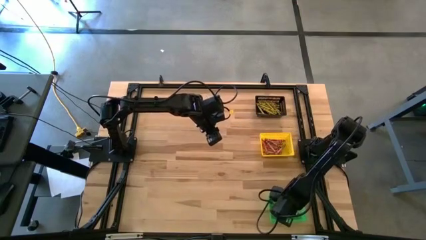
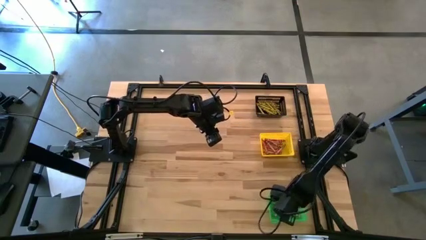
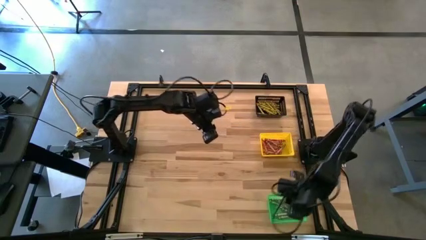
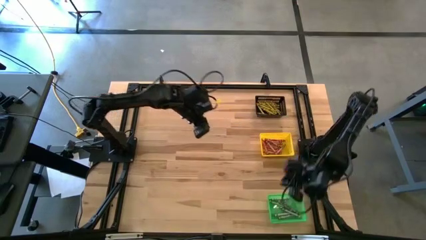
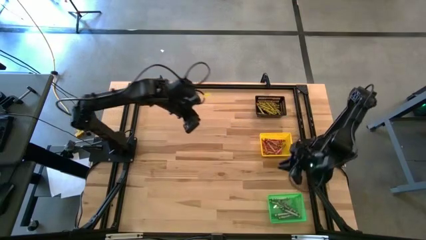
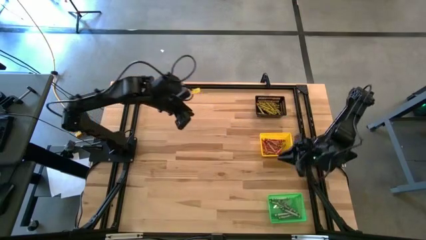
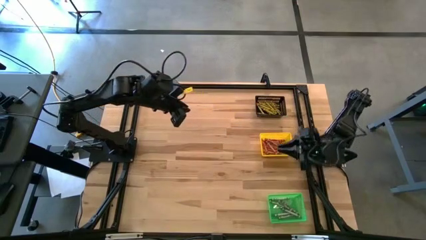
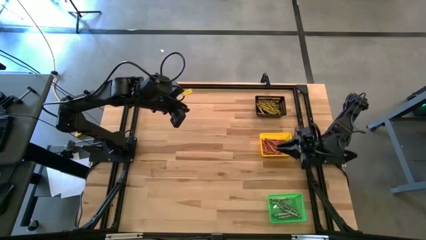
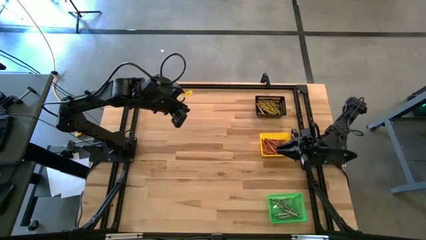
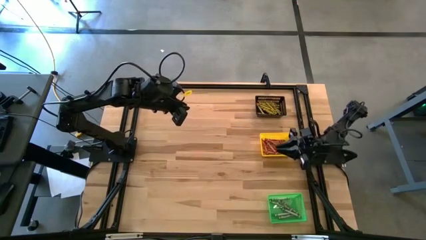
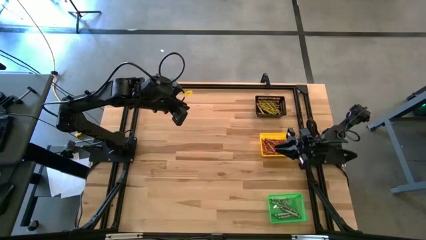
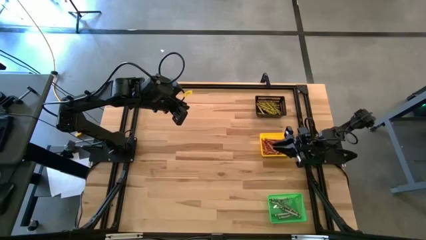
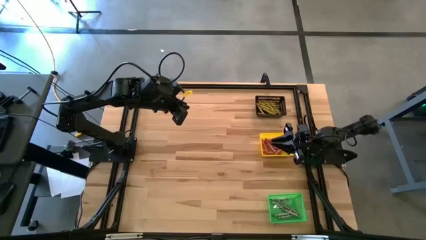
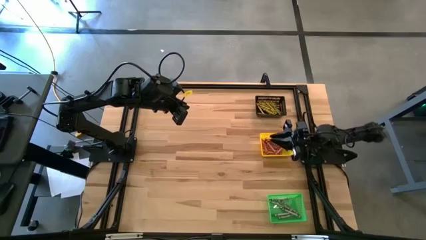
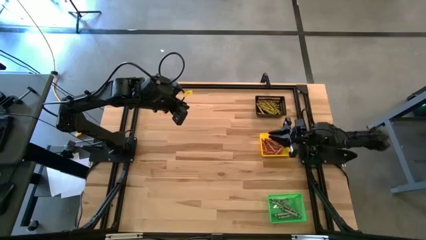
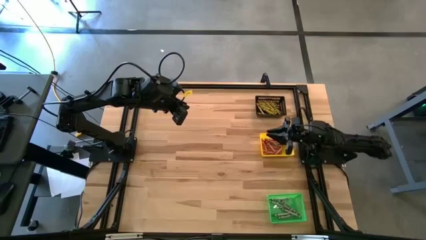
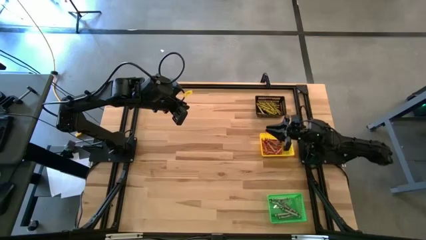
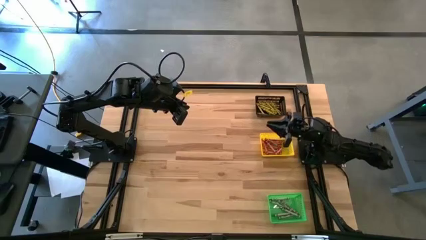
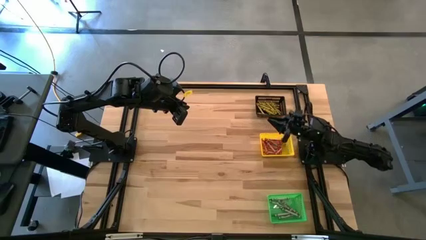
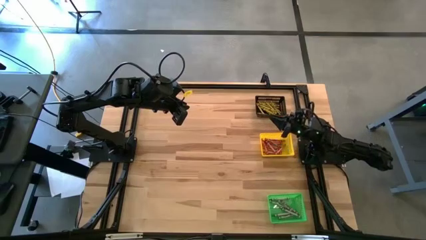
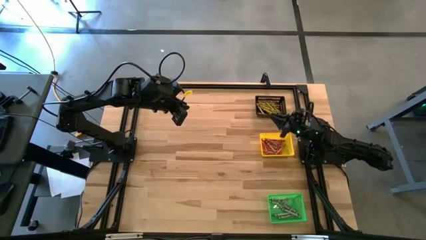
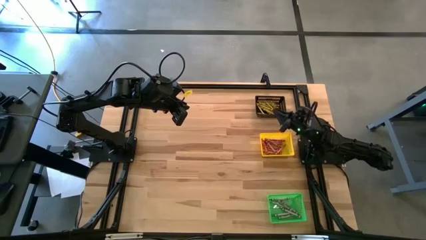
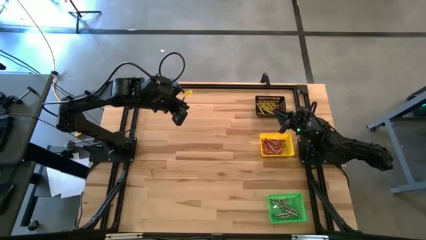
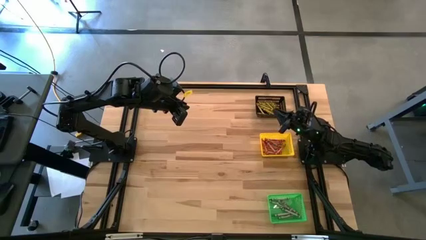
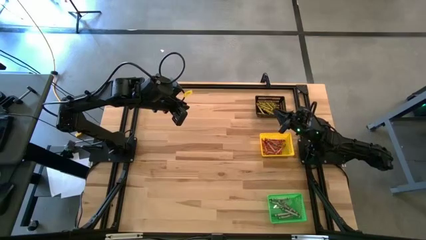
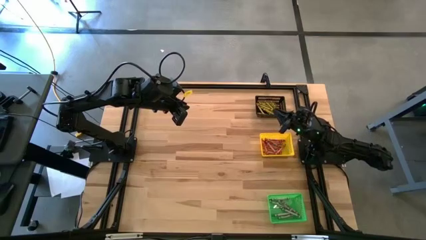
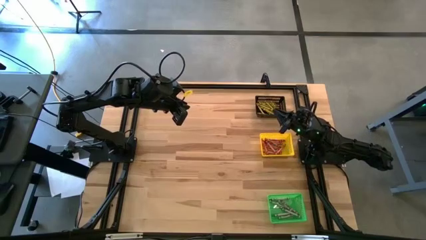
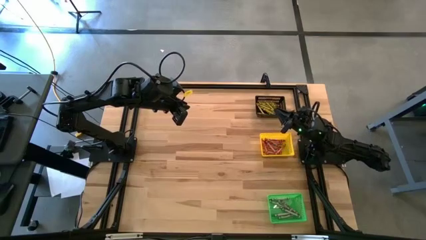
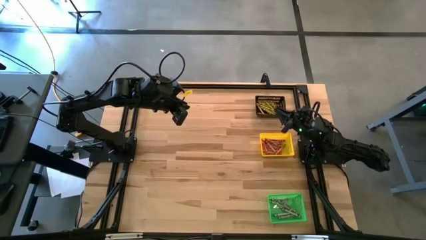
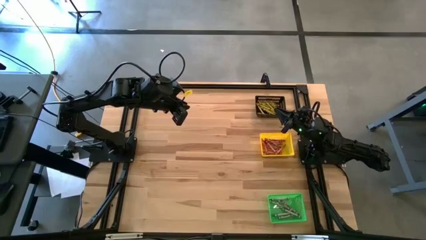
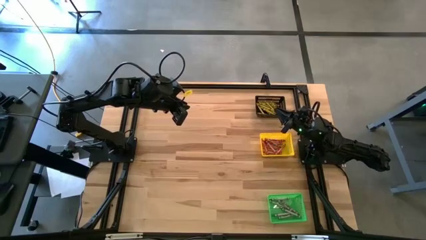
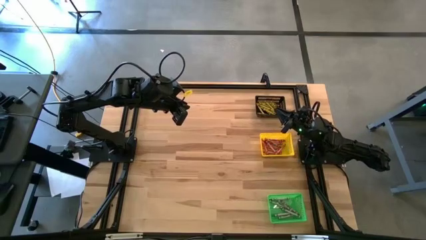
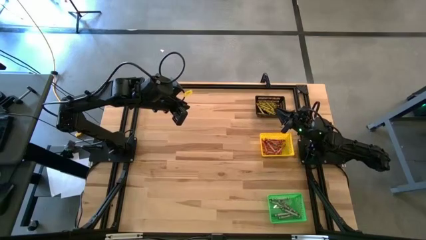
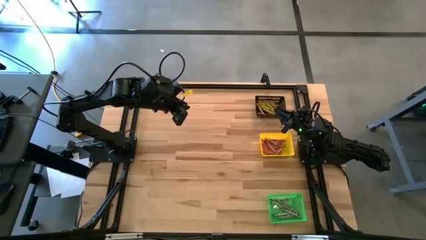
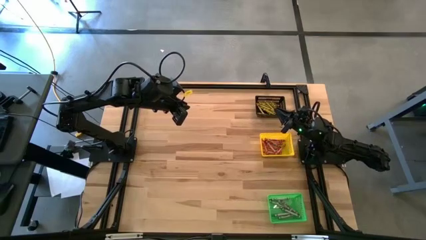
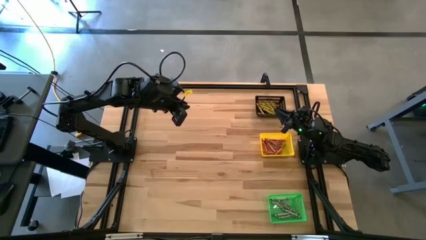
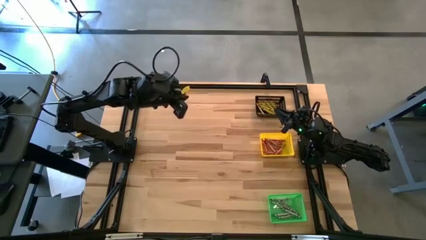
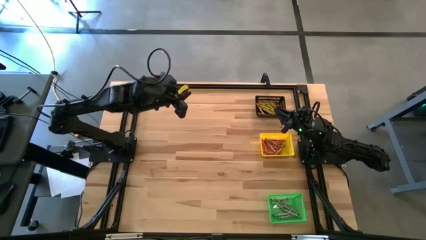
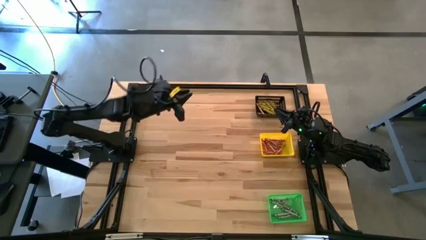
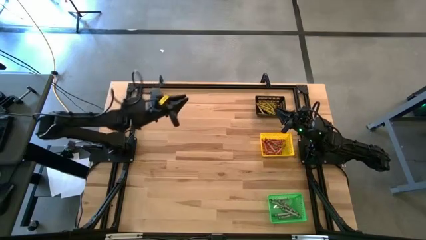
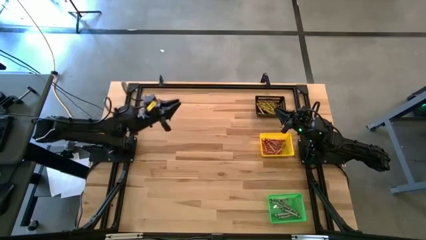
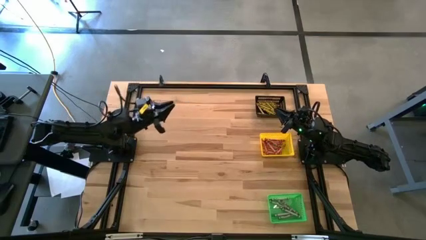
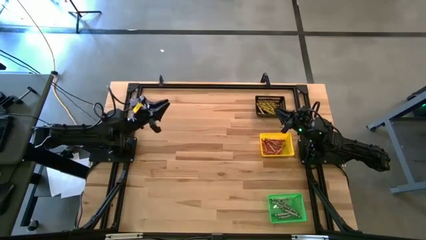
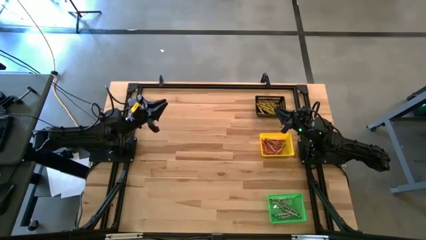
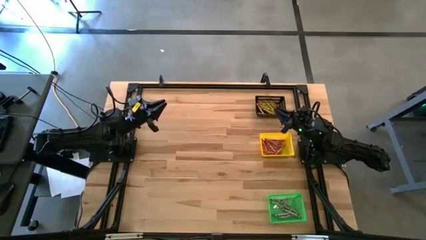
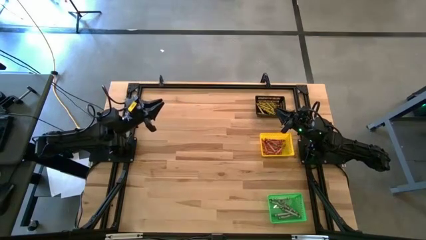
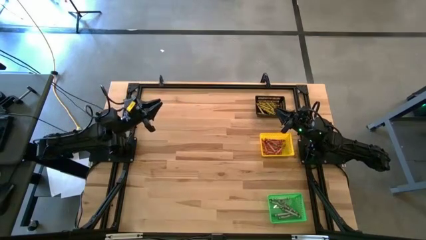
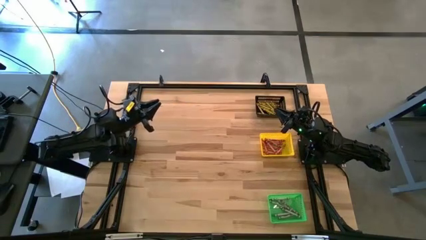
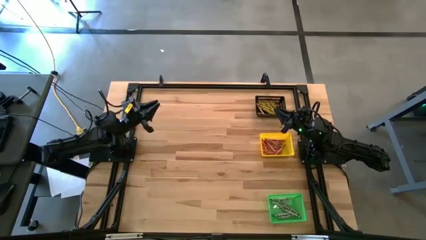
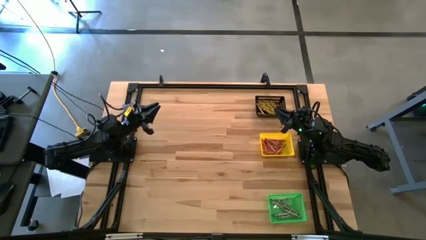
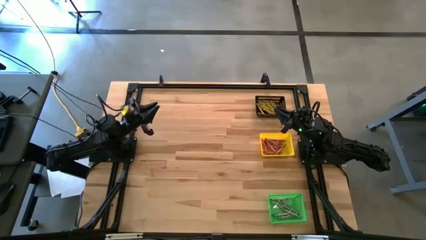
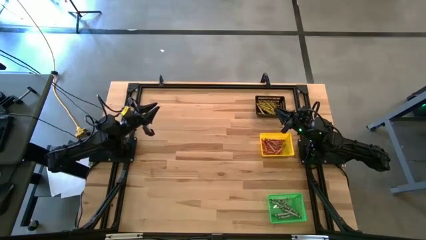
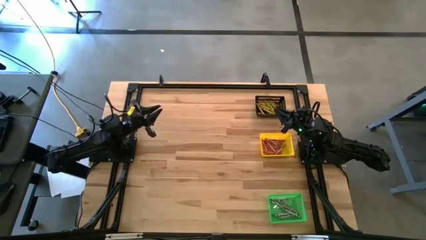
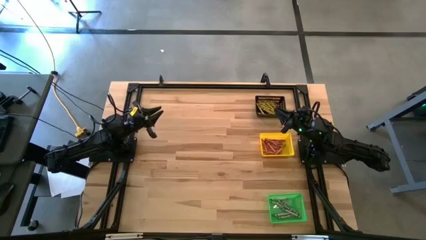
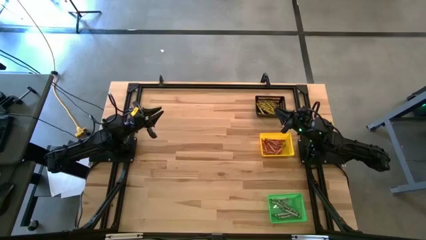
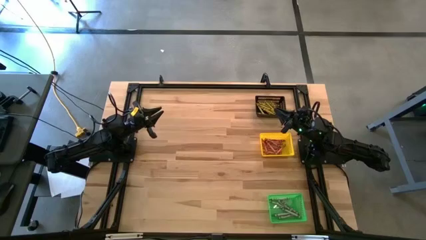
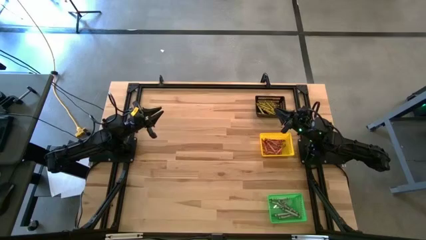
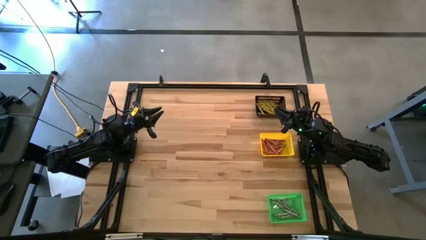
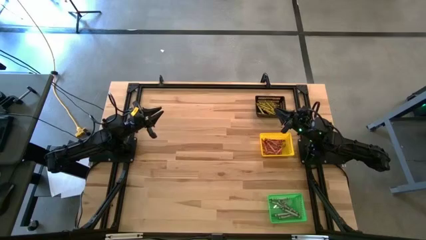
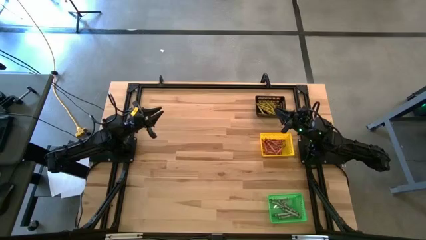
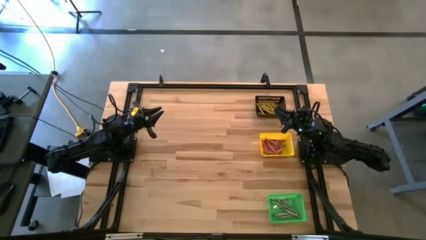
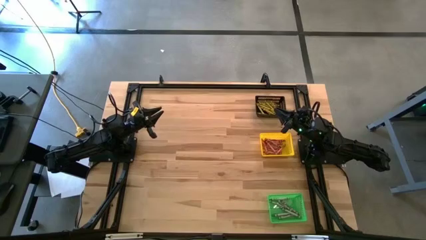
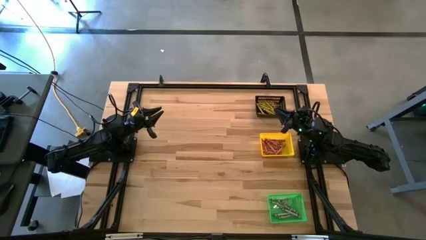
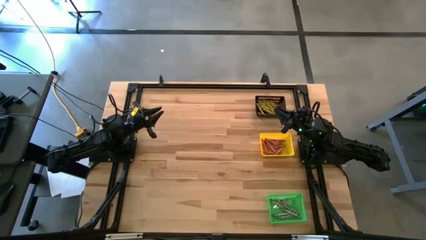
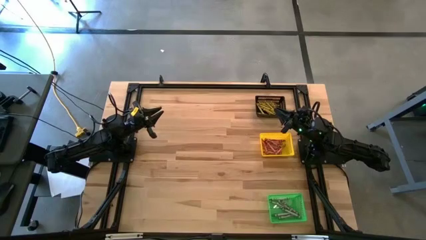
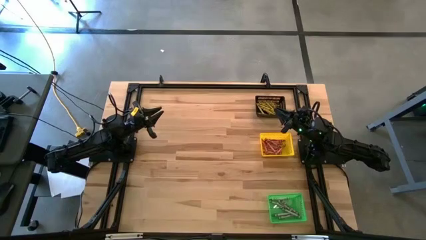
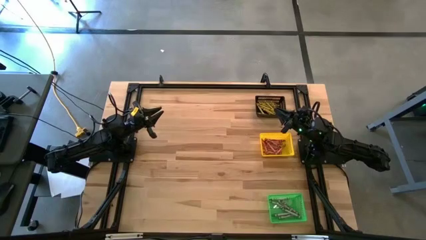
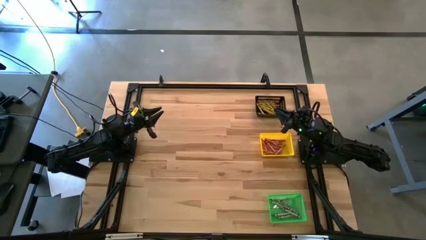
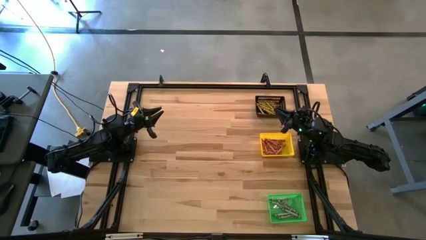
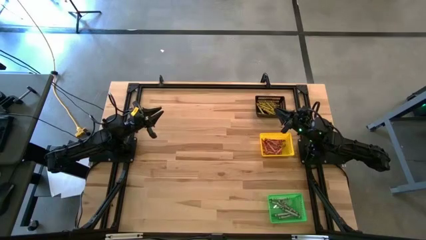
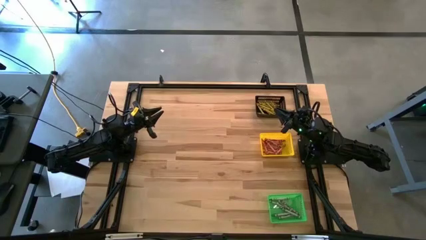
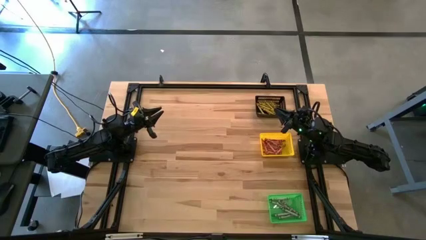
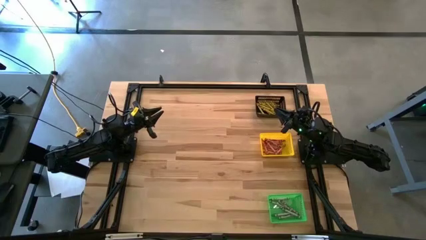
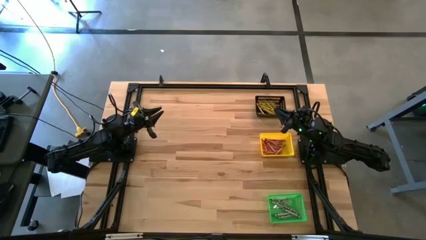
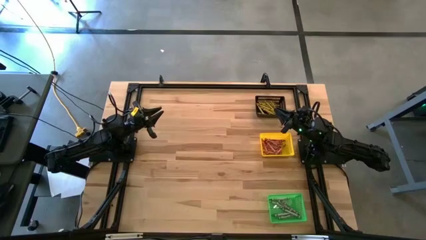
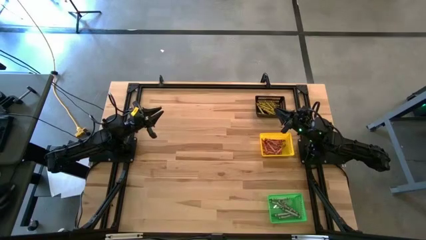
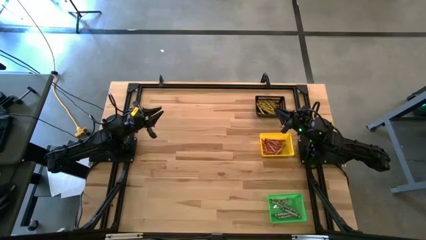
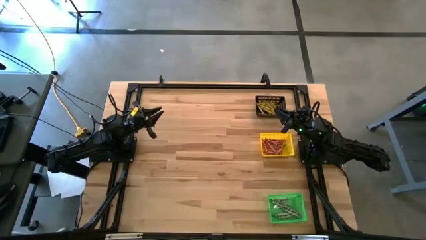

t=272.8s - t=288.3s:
Task: Sort crayons
Return to Home Position

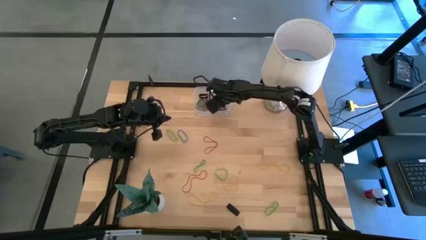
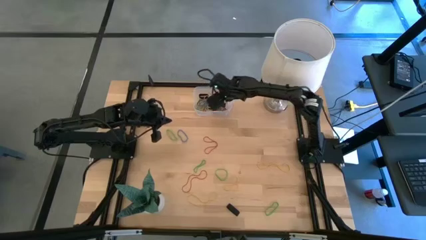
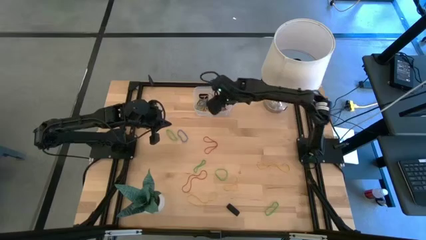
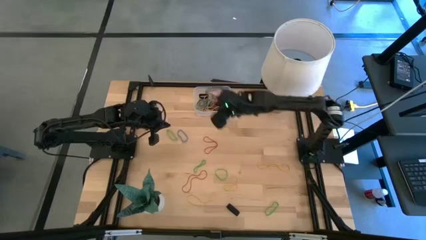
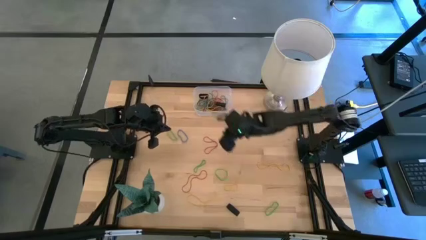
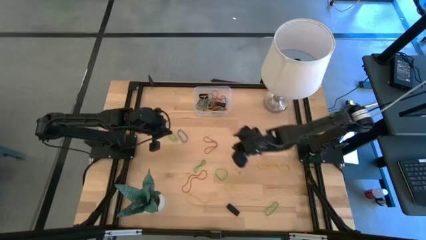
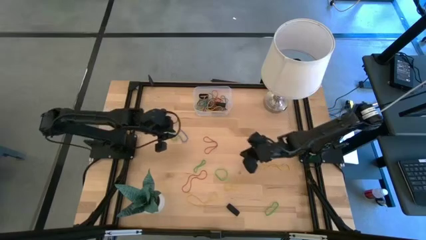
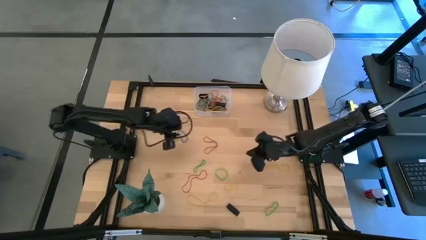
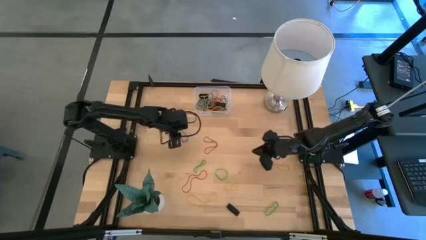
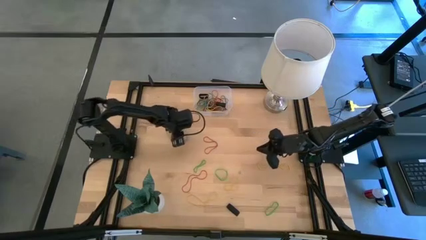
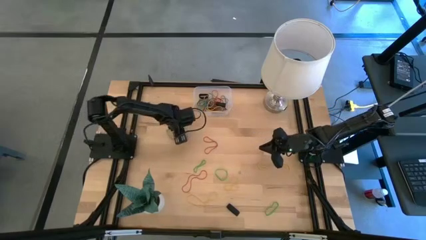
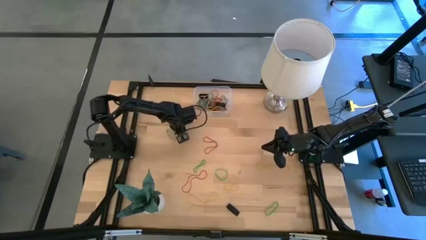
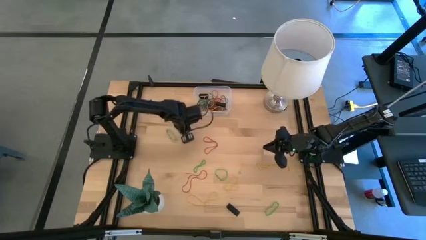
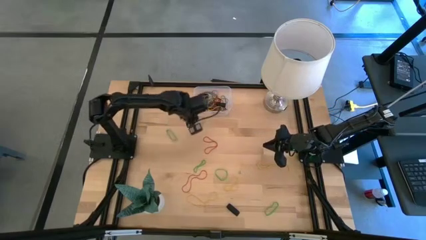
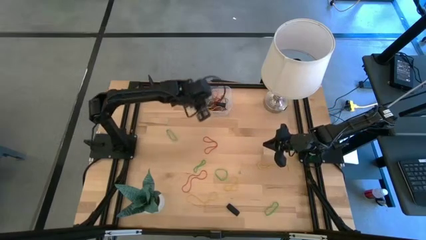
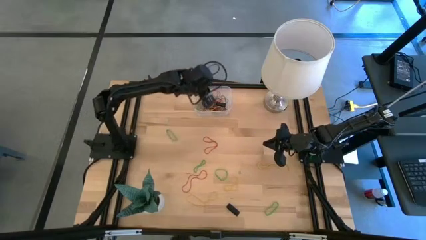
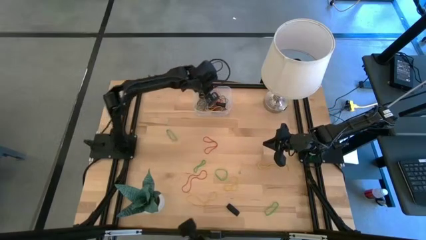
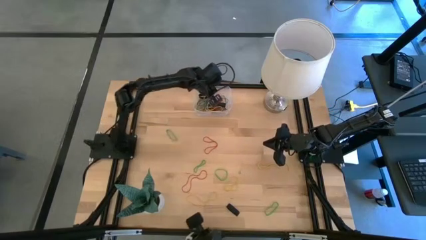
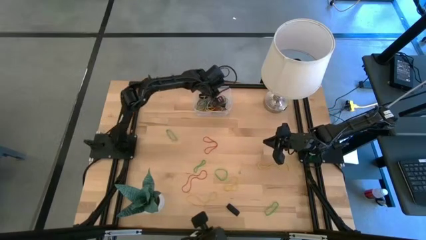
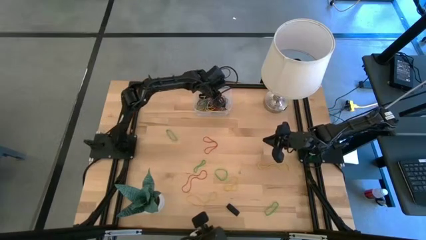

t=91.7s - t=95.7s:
Task: Pick and place rubber bands into bin
Put the blue rubber band into the transparent bin
